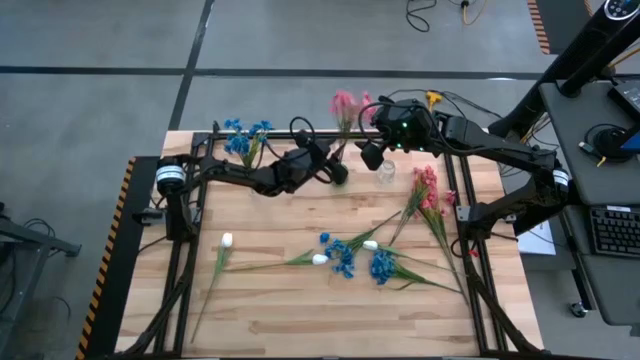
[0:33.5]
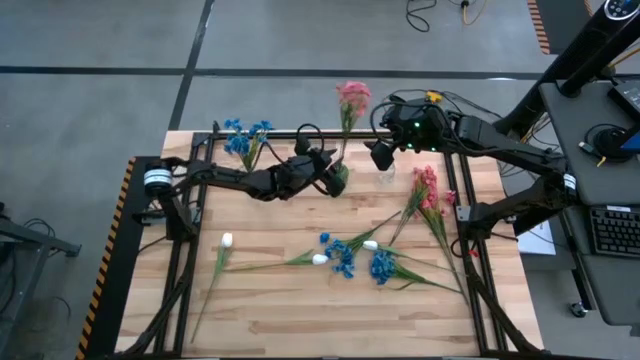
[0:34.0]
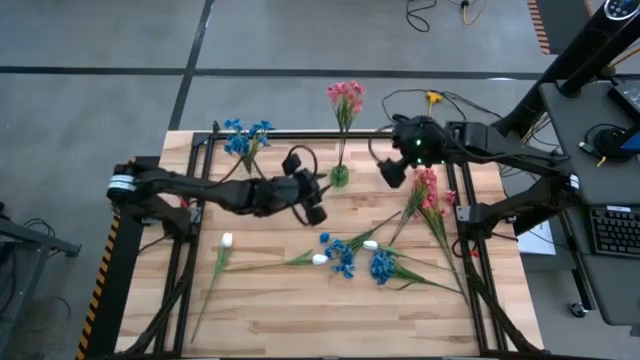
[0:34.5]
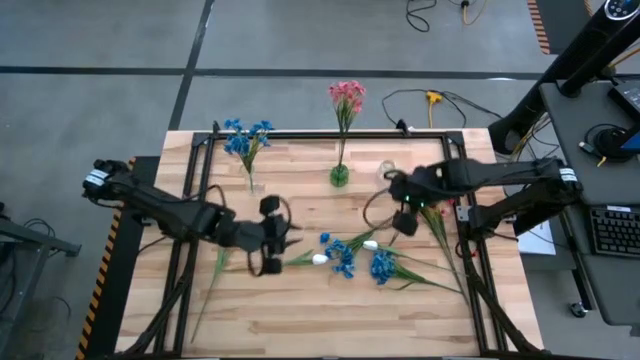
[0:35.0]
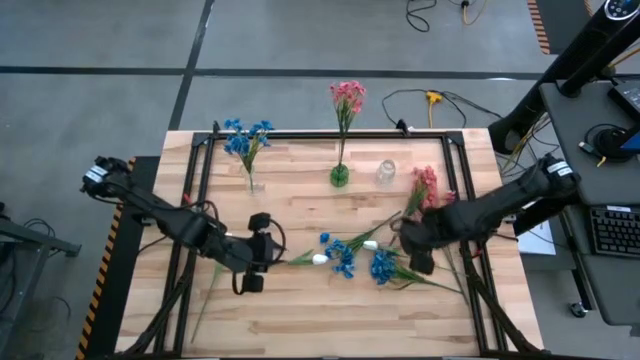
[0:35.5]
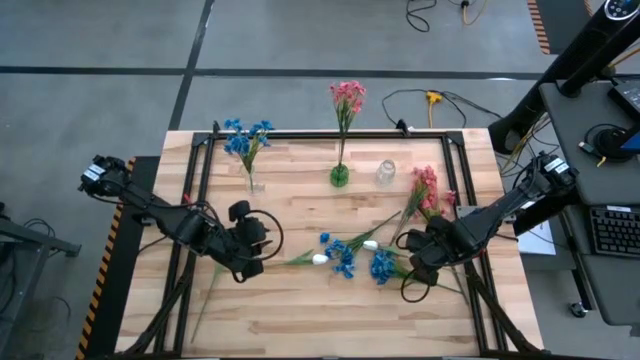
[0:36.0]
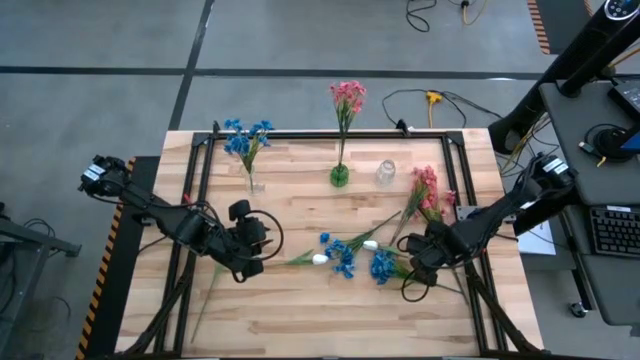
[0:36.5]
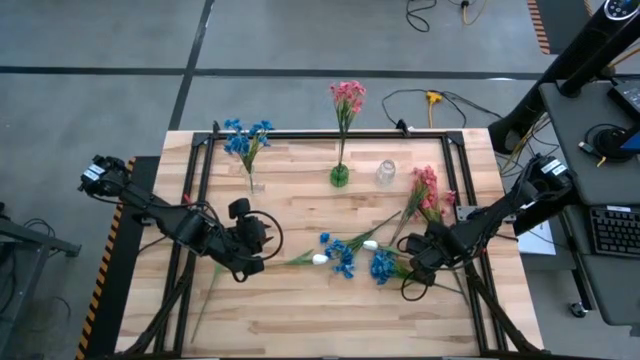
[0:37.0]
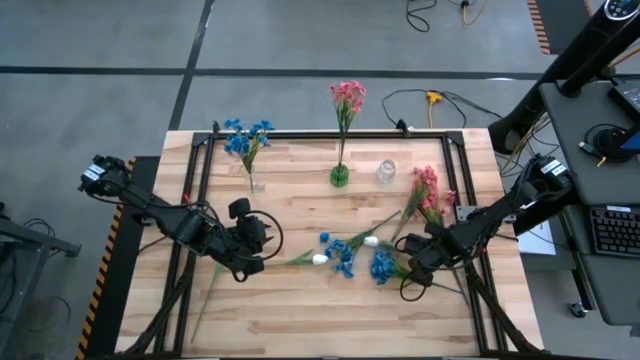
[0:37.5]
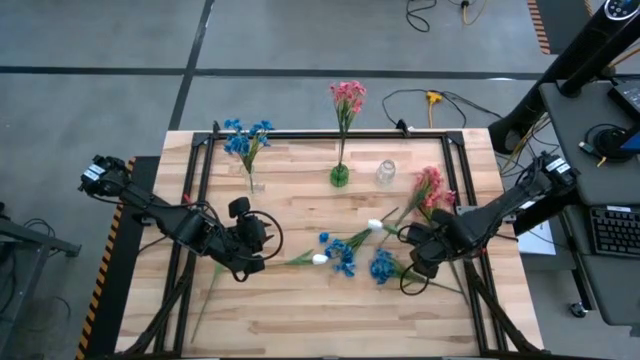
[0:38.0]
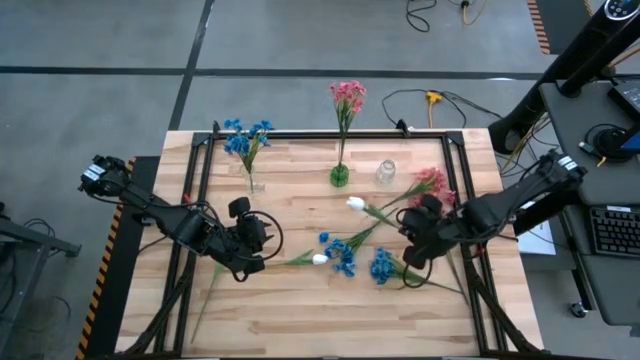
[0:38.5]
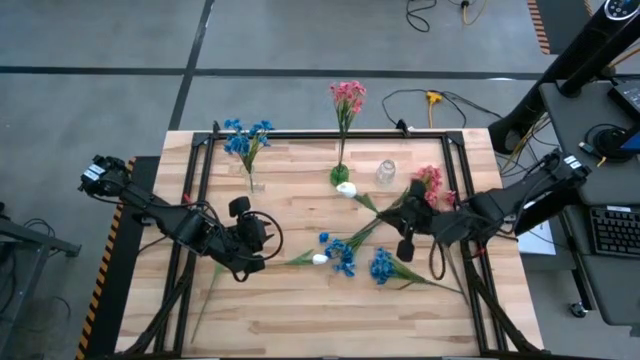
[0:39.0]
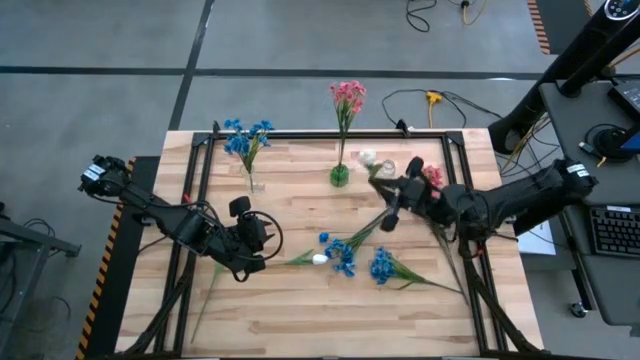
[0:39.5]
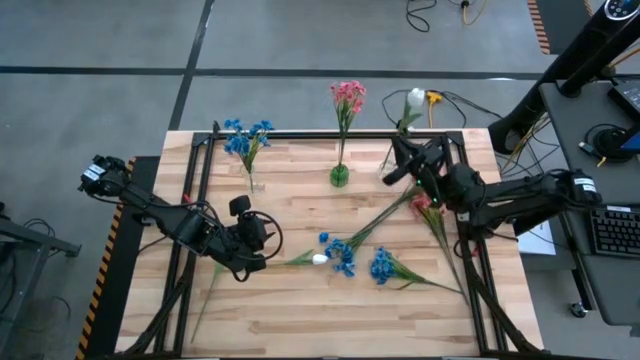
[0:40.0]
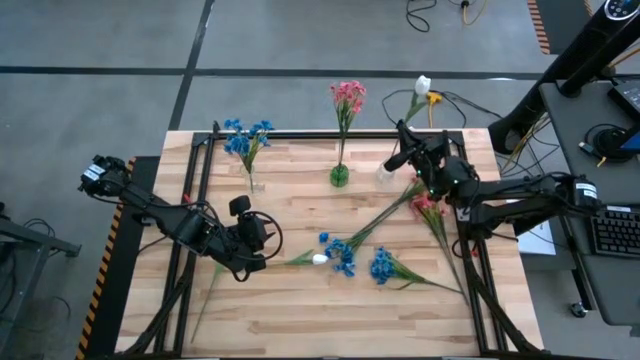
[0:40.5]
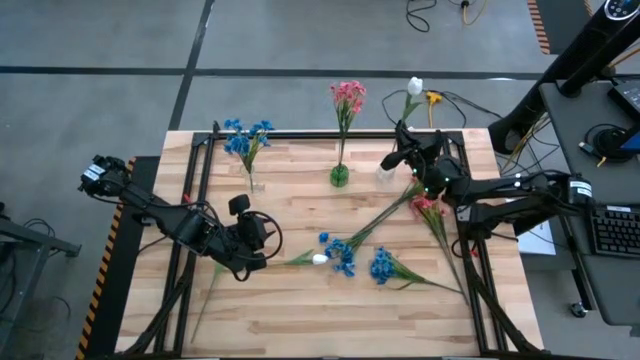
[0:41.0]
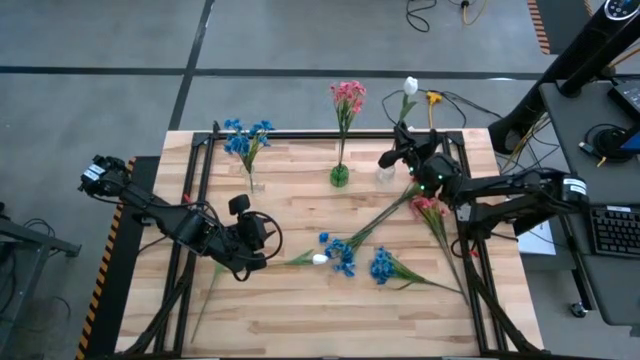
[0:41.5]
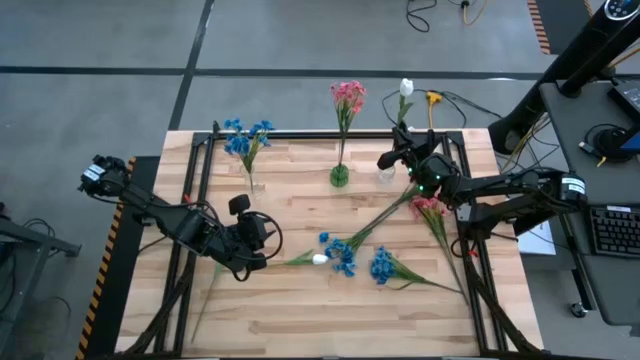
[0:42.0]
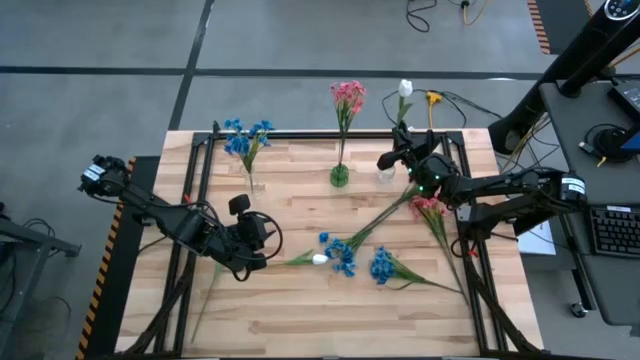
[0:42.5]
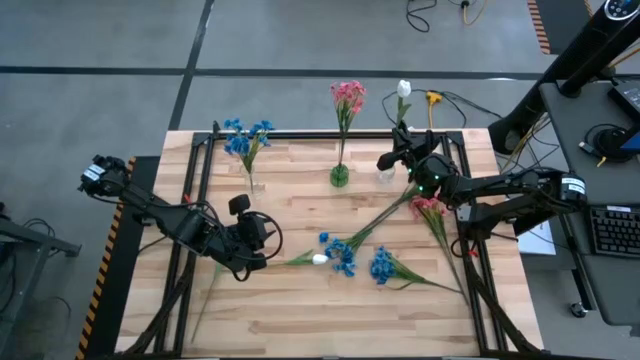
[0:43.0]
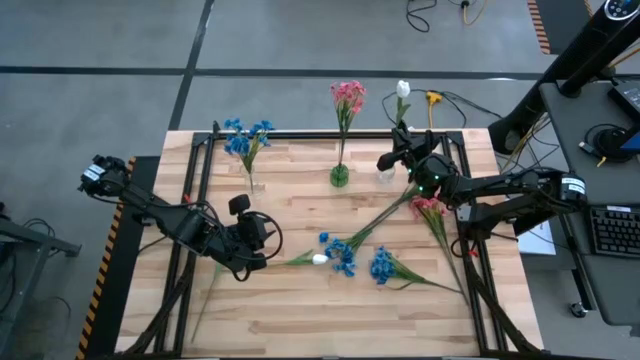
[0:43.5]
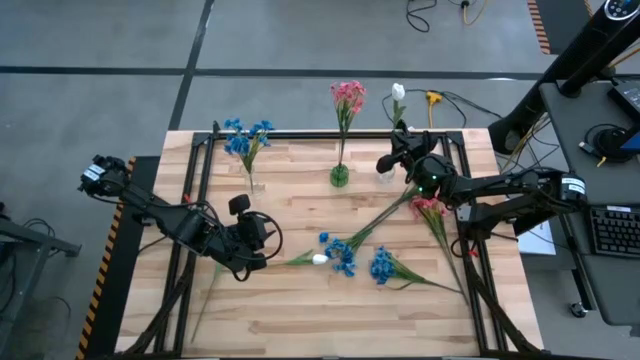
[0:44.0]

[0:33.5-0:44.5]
Task: Sort flowers into vase by color
Put the middle right white flower into the right transparent vase

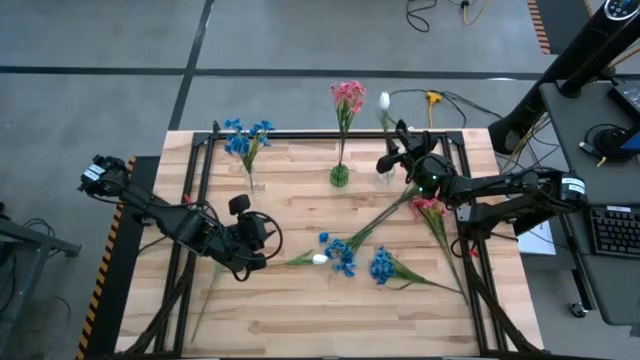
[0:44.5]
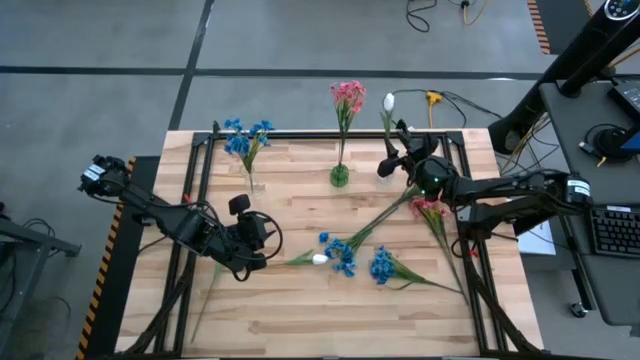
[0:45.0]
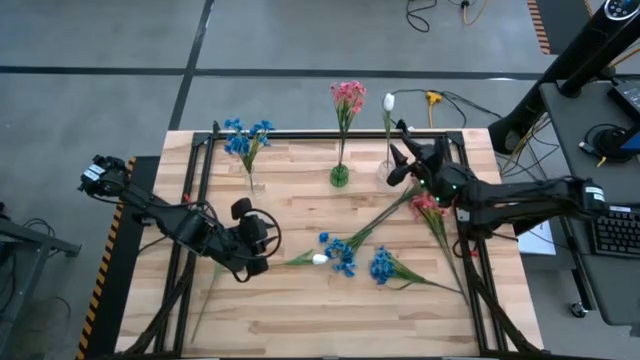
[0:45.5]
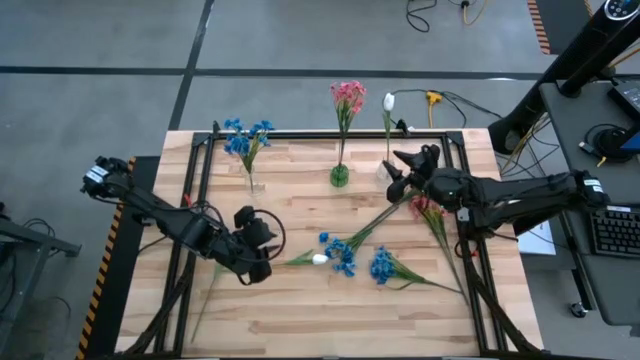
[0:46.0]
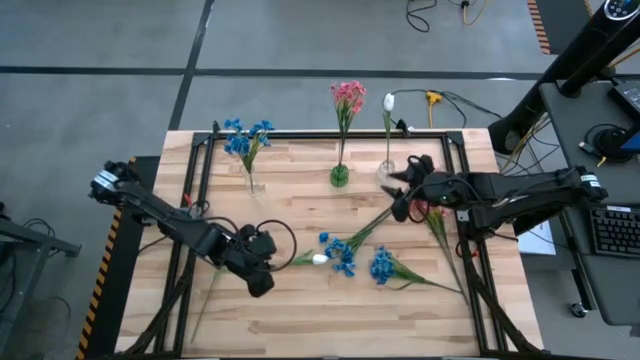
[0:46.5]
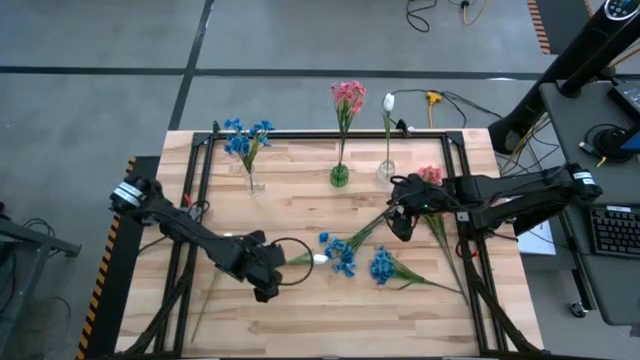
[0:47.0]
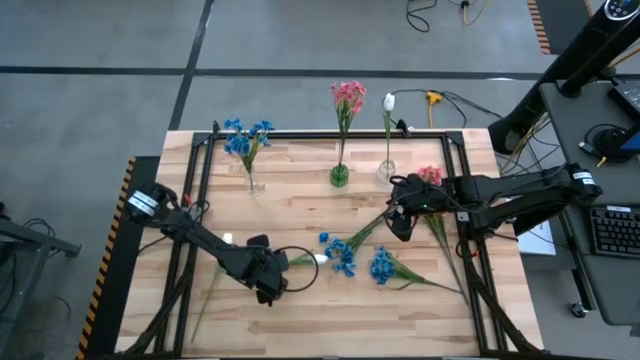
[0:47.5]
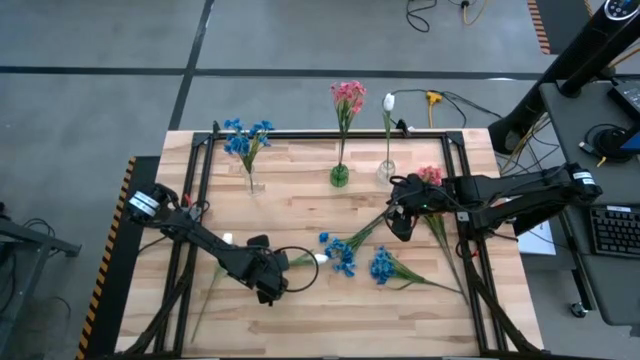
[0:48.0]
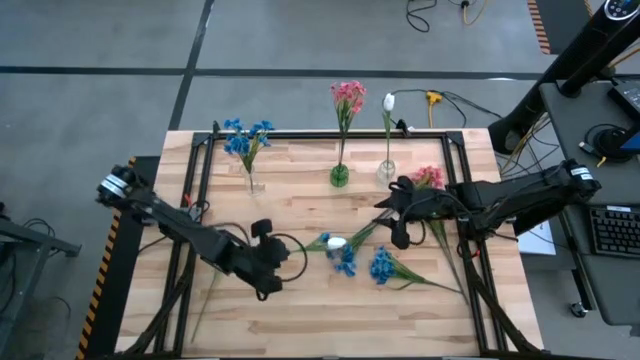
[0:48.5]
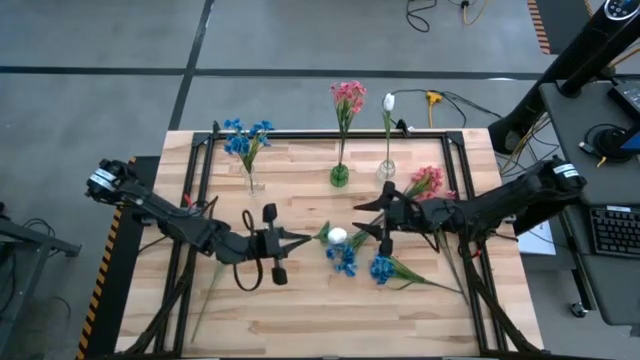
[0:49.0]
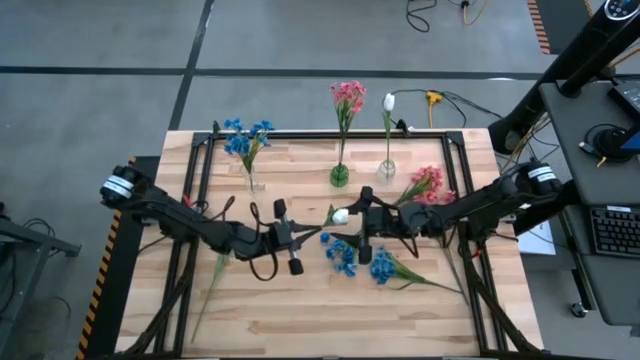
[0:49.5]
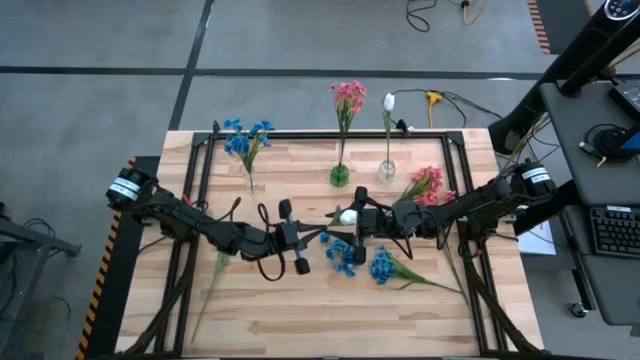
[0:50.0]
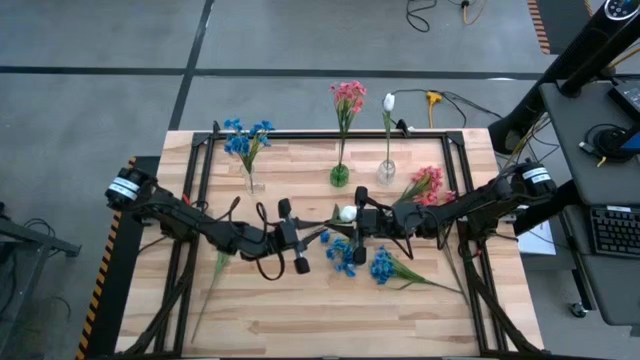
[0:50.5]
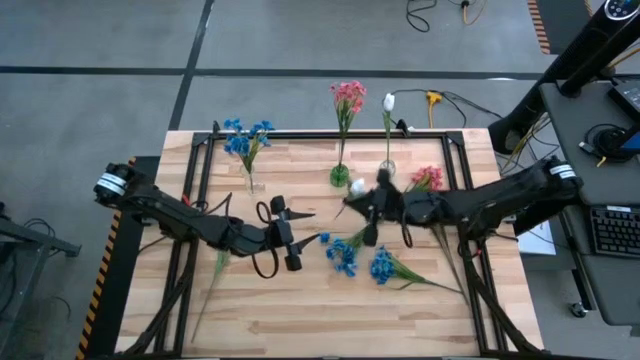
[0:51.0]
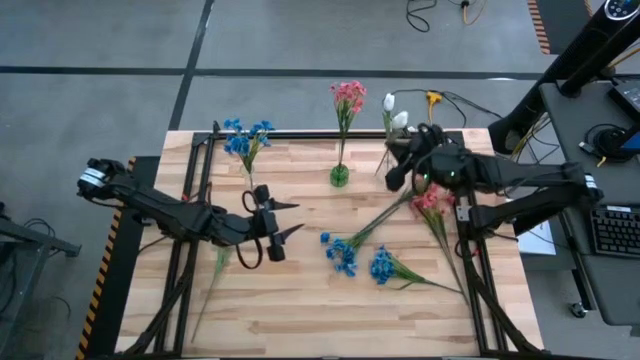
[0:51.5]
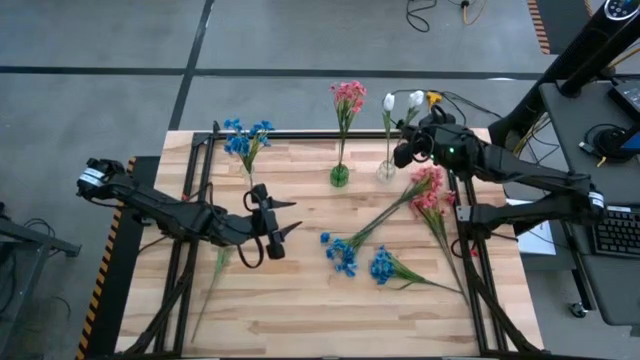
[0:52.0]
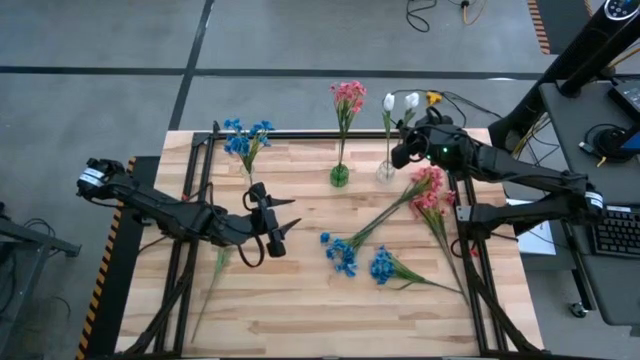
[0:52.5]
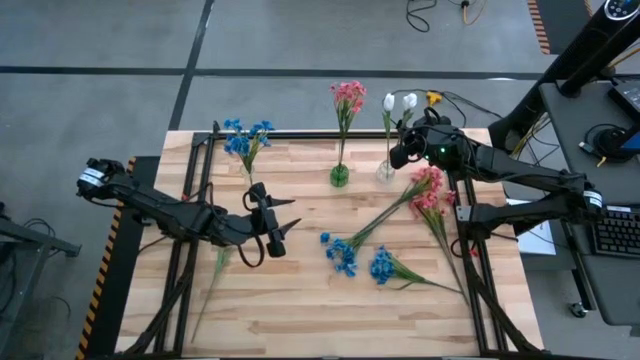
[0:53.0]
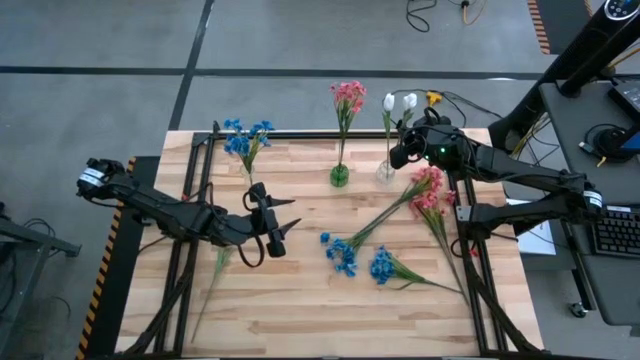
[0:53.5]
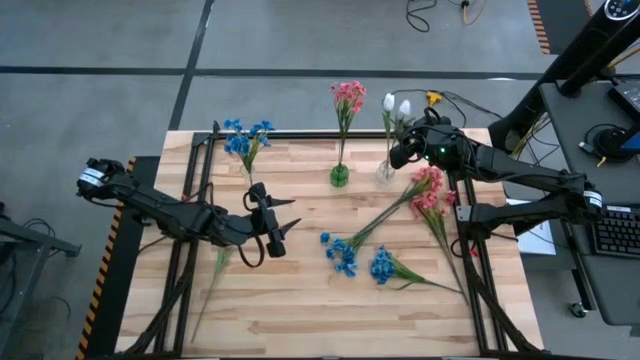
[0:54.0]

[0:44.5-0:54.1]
Put the right white flower into the right transparent vase
